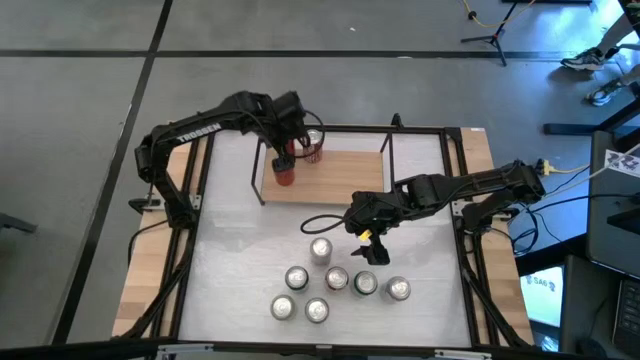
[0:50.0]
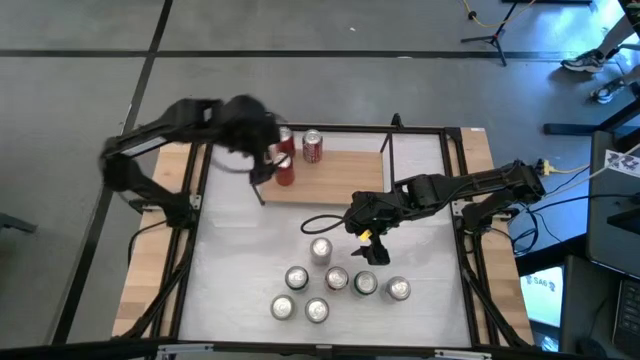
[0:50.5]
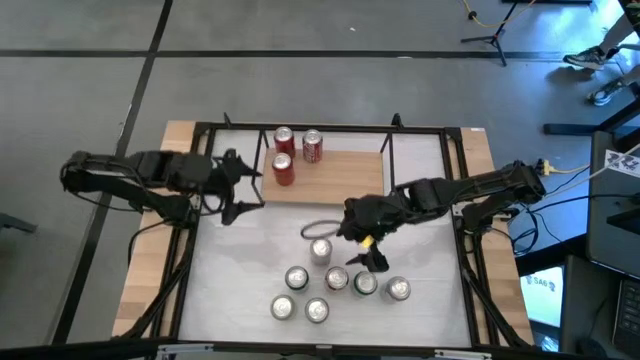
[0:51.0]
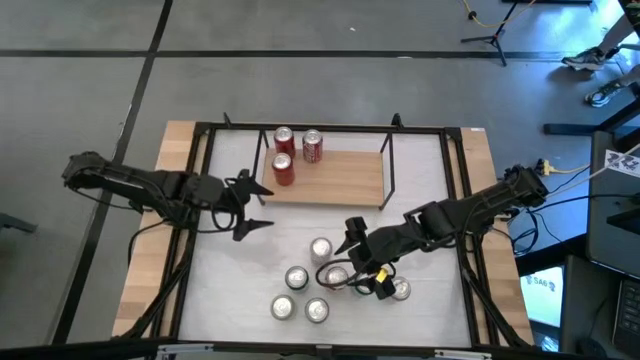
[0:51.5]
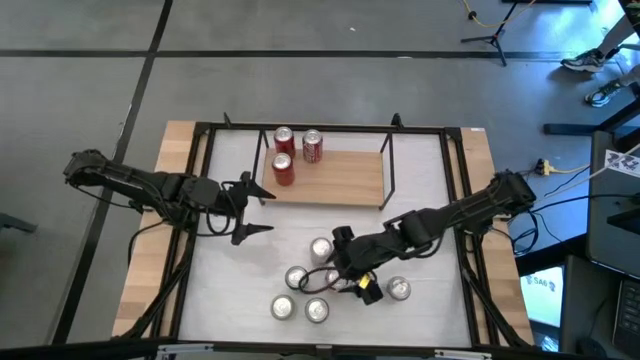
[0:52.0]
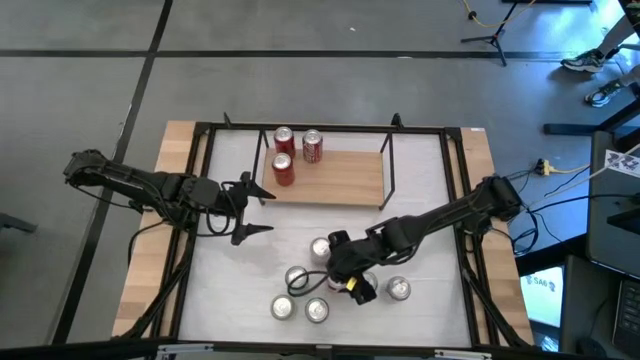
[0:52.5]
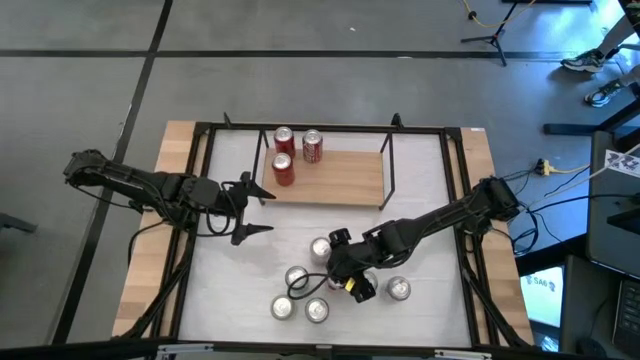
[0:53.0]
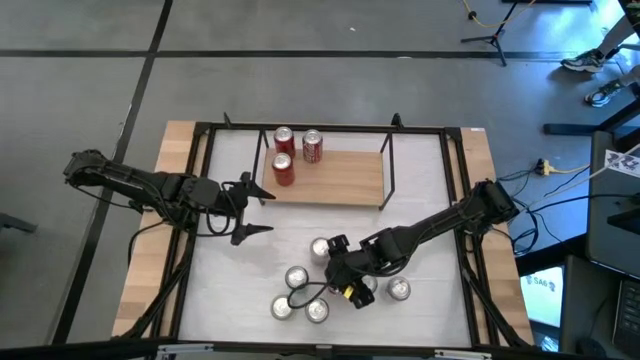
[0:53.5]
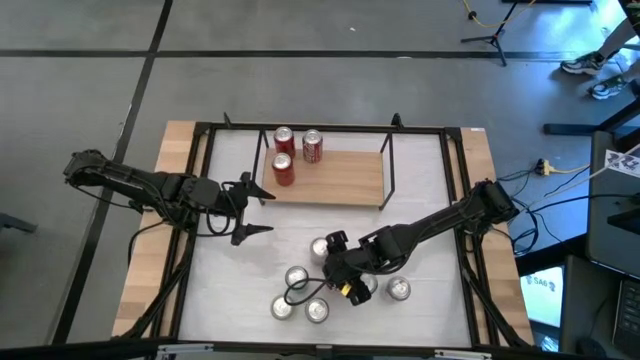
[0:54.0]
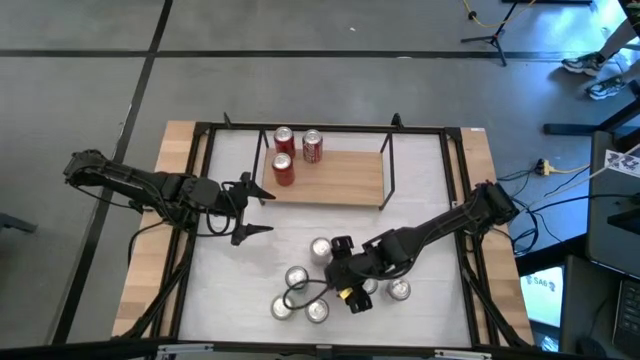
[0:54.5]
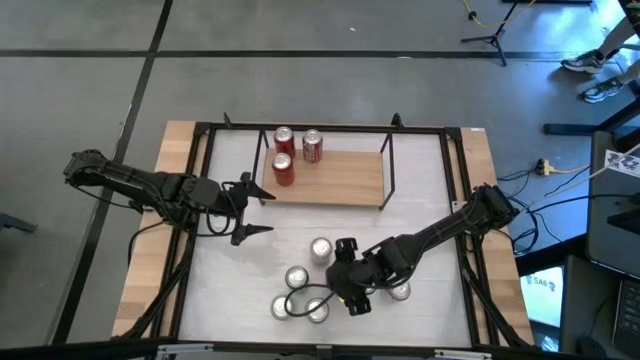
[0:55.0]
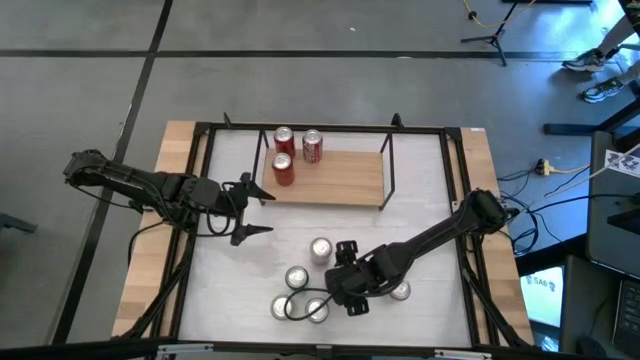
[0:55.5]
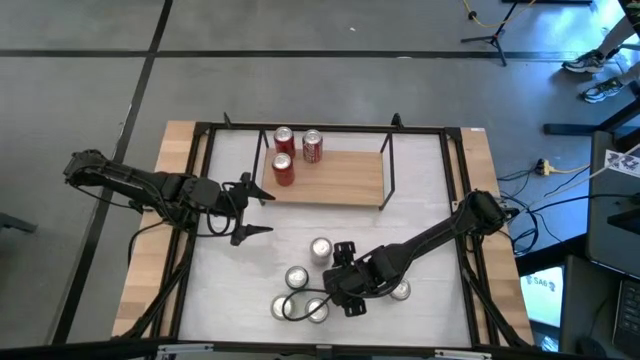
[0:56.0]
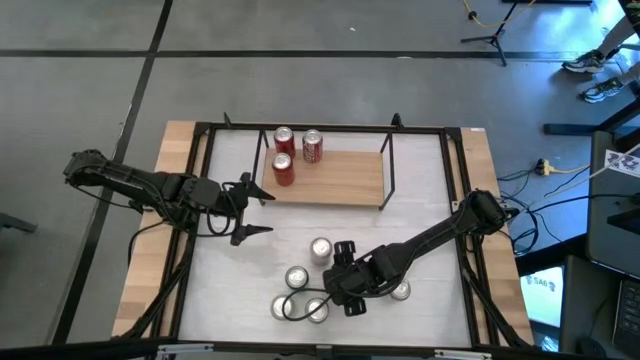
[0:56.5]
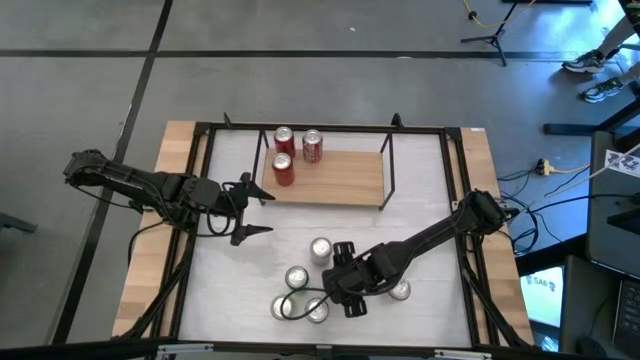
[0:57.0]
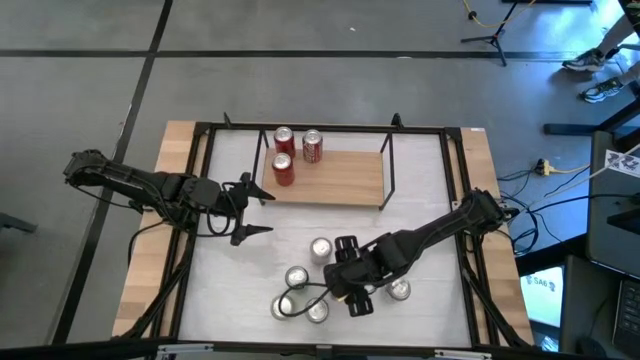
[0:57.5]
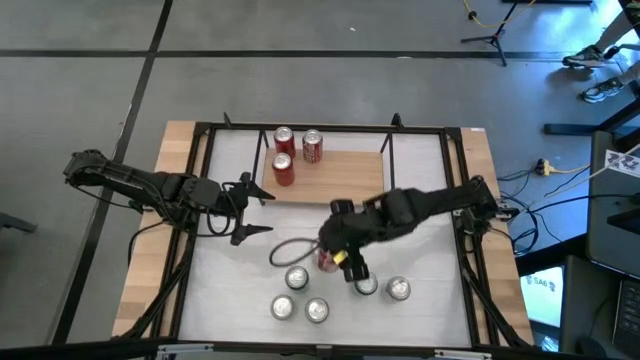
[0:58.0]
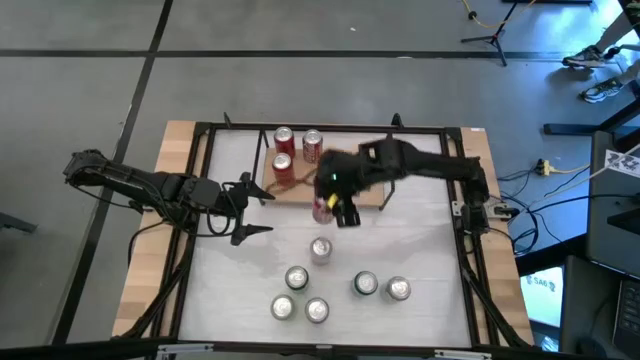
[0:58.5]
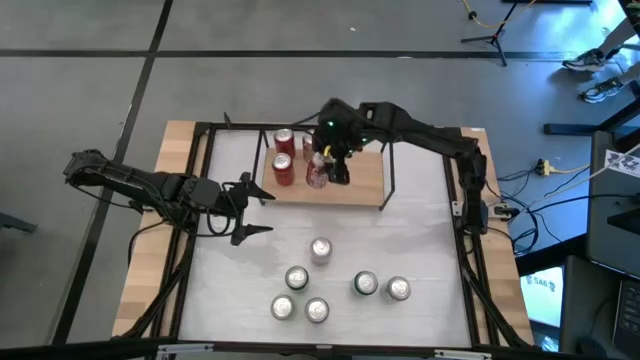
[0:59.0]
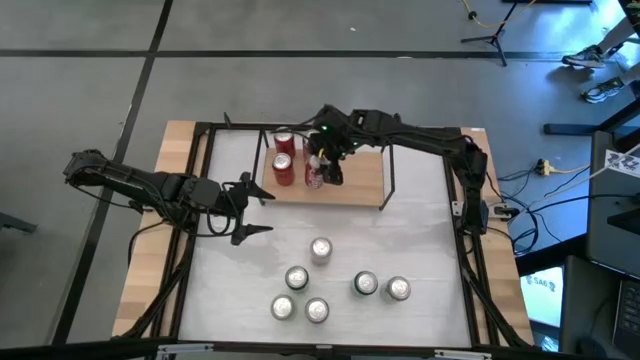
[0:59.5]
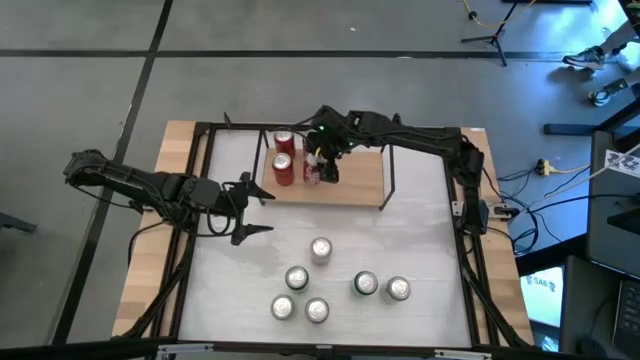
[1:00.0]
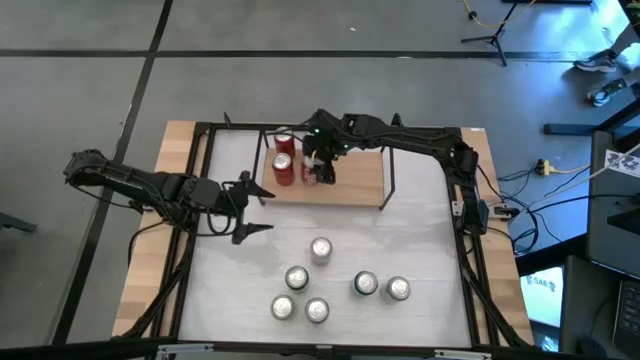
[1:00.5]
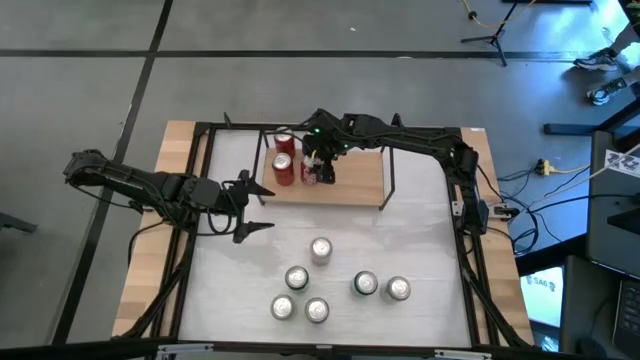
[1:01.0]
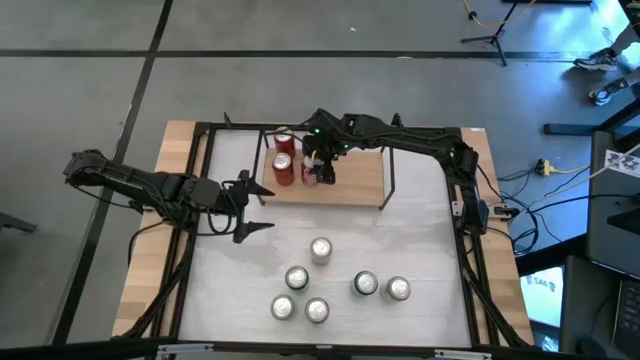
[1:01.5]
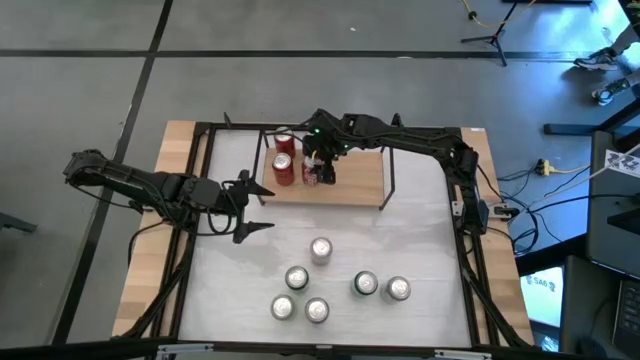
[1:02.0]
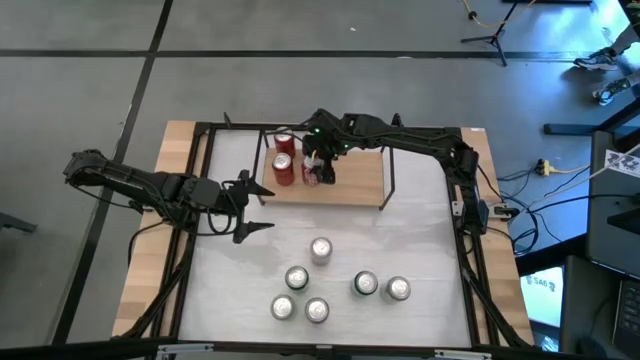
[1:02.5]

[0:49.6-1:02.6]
Task: Place canned beverage on shelf
Put the red white soda can on the shelf aligned with the other white soda can

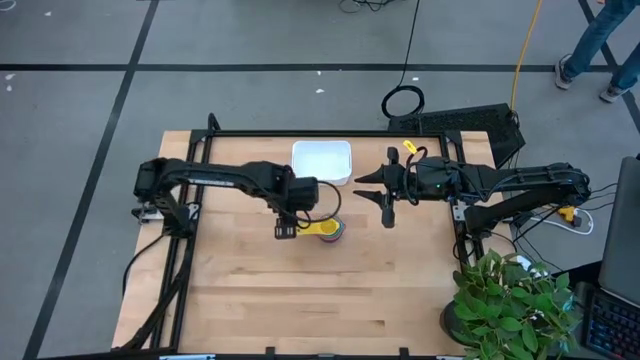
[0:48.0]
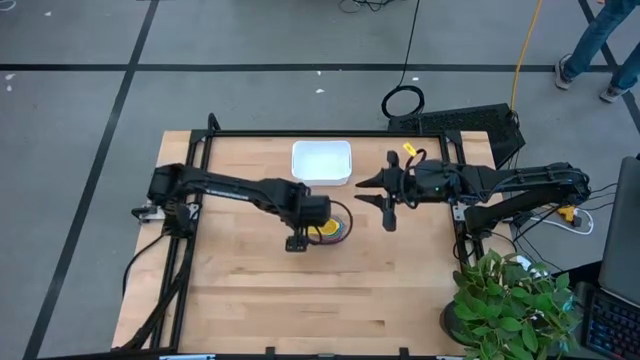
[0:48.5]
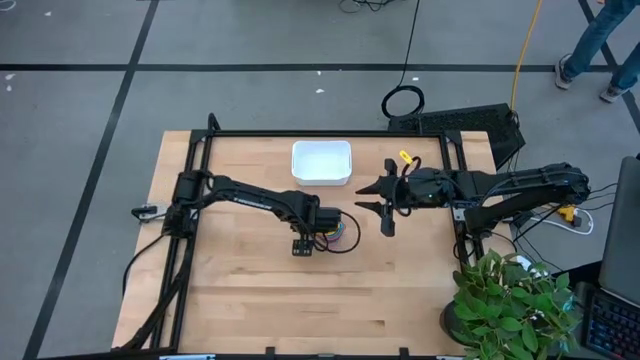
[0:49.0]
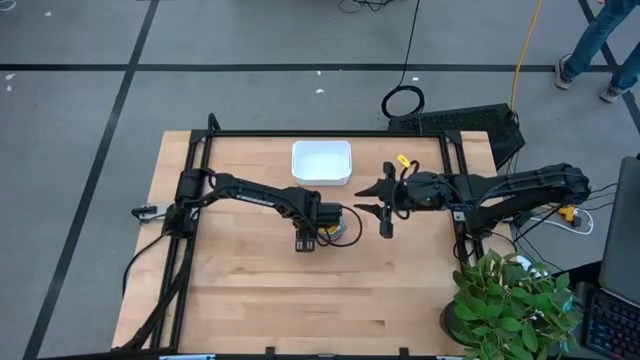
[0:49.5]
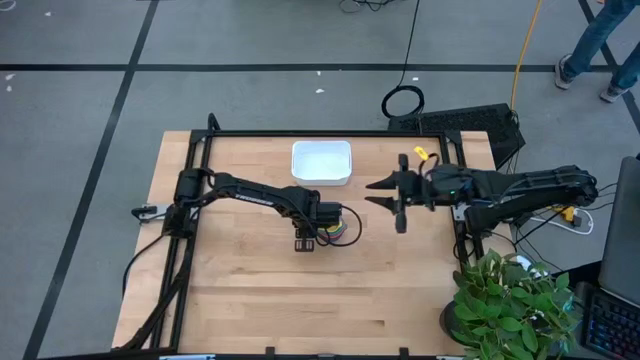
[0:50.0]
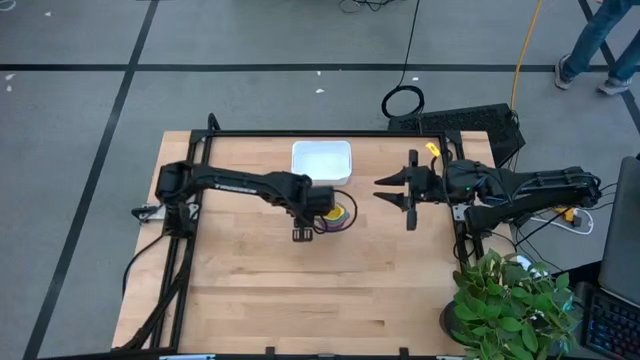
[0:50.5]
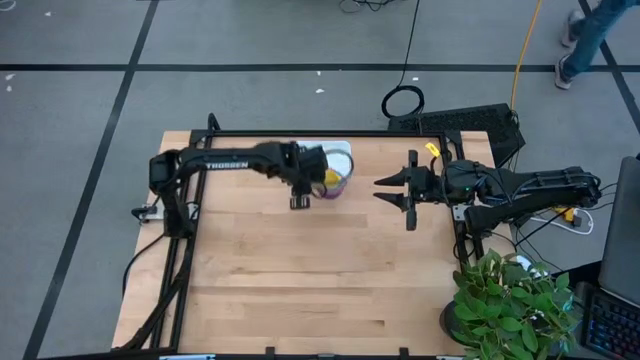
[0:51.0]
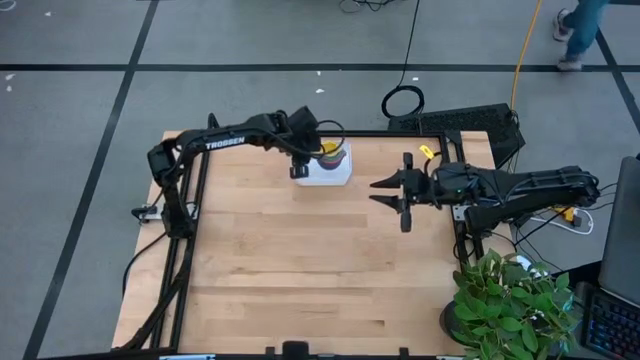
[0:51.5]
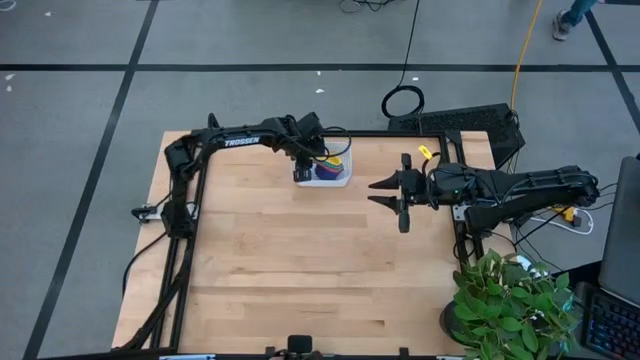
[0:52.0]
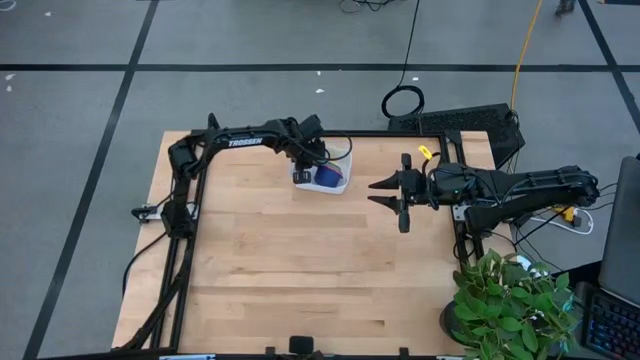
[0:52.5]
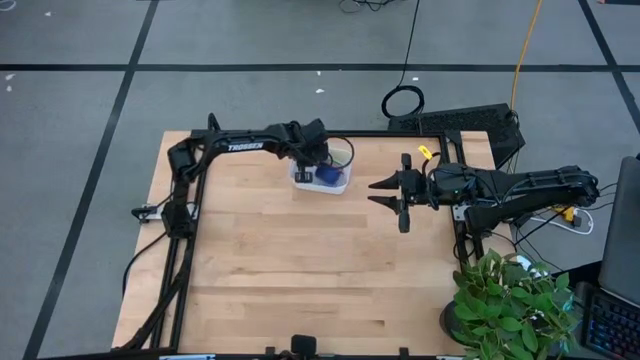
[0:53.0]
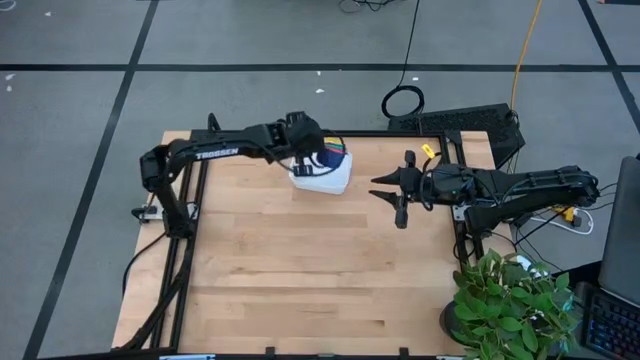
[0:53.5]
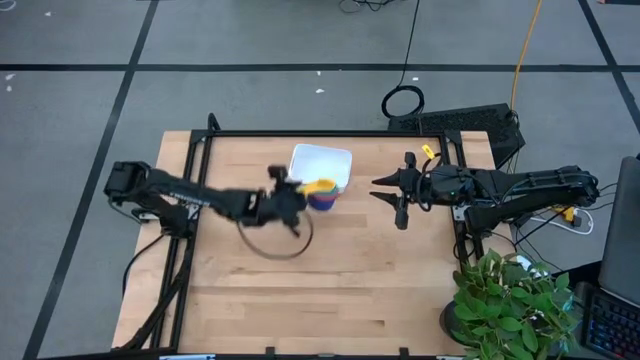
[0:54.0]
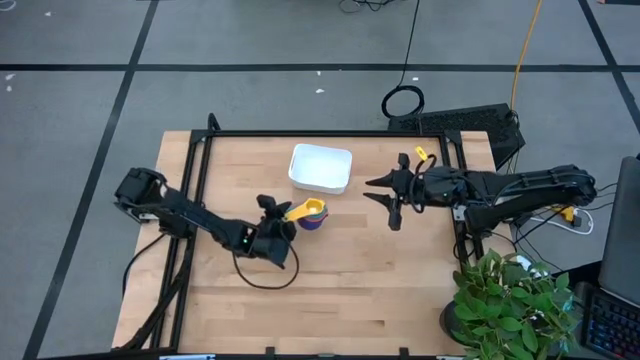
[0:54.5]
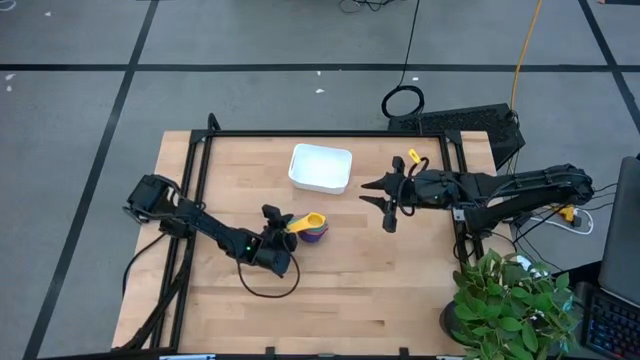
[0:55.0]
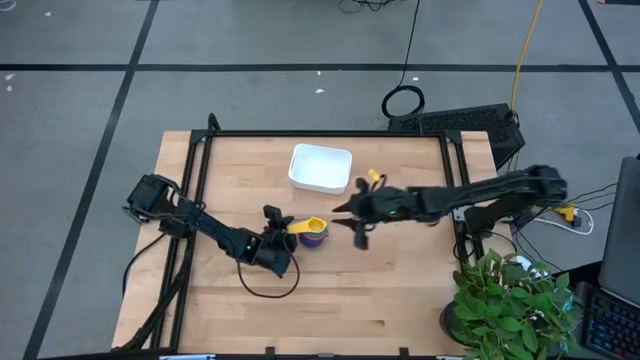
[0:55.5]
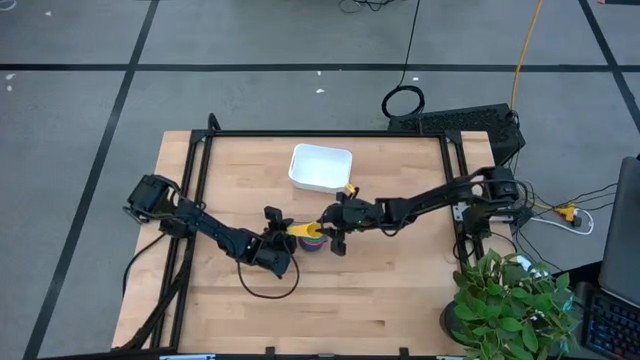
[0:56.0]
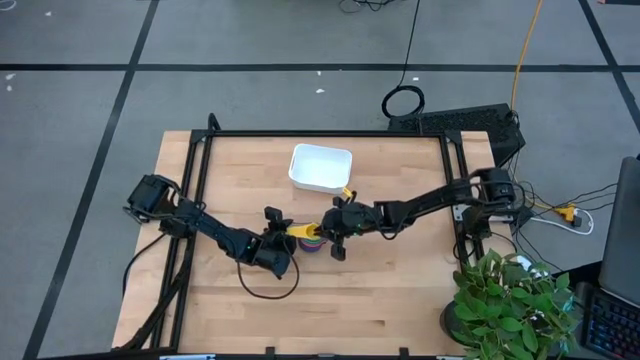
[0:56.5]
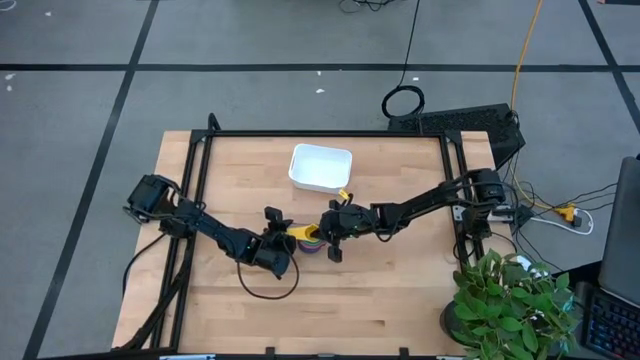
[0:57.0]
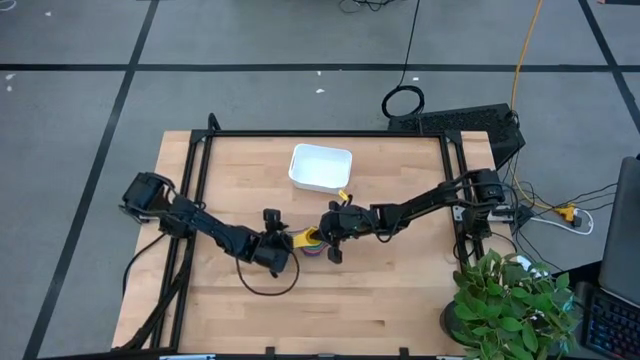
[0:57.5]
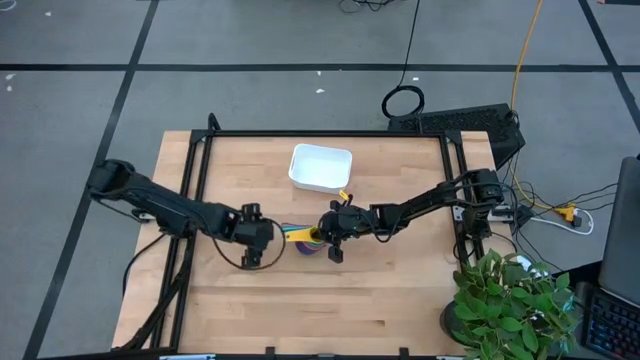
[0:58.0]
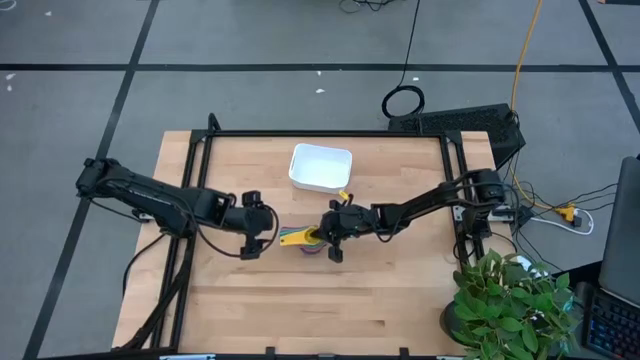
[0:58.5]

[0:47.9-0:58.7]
Task: Nest measuring cups in basket
Put the nested measuring cups into the white bin
